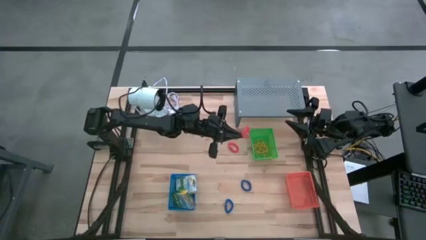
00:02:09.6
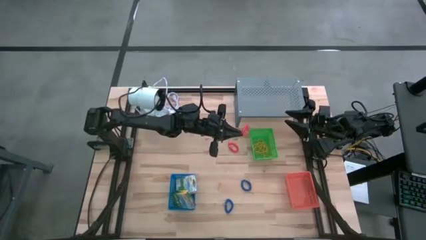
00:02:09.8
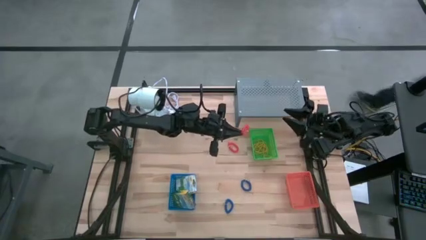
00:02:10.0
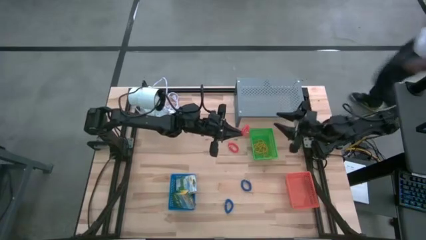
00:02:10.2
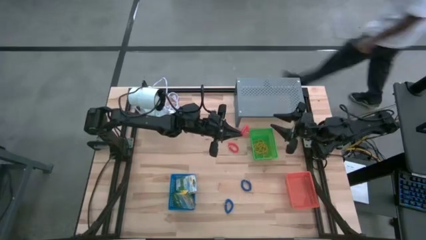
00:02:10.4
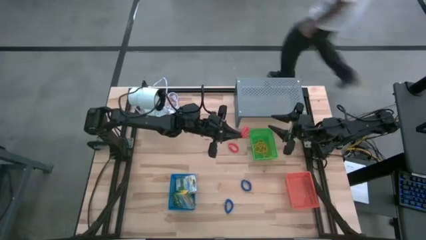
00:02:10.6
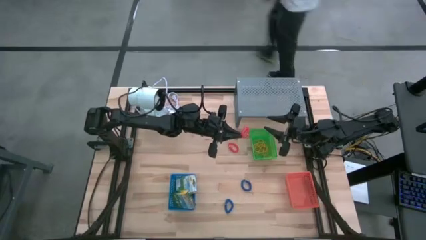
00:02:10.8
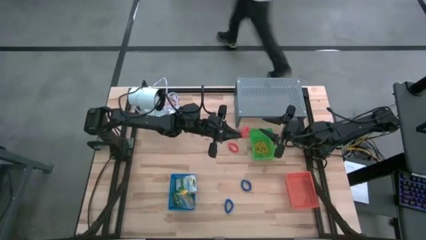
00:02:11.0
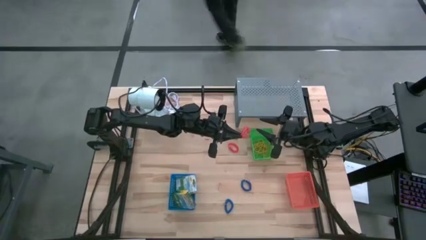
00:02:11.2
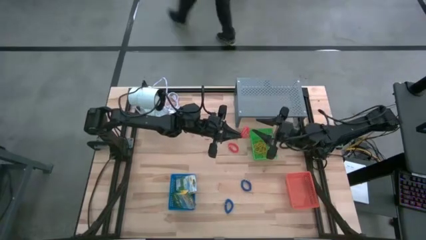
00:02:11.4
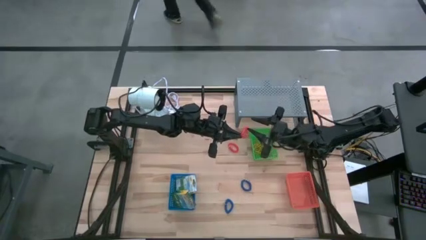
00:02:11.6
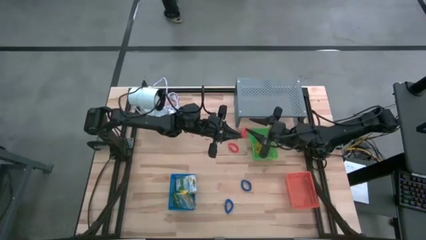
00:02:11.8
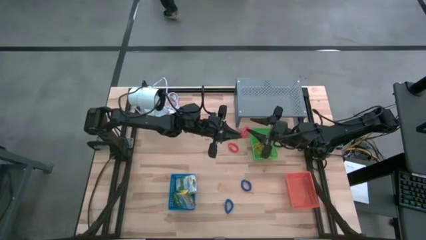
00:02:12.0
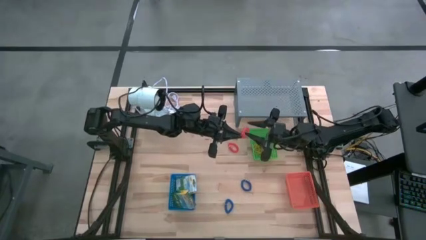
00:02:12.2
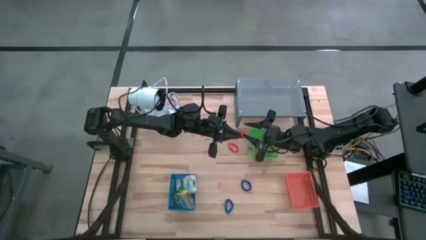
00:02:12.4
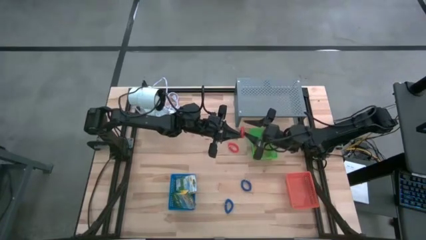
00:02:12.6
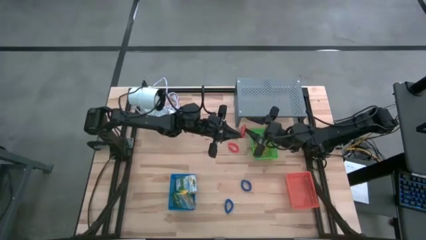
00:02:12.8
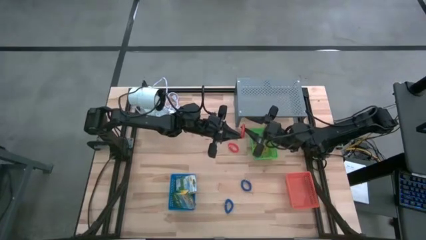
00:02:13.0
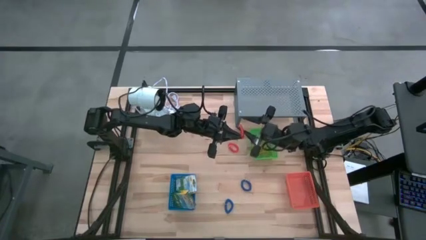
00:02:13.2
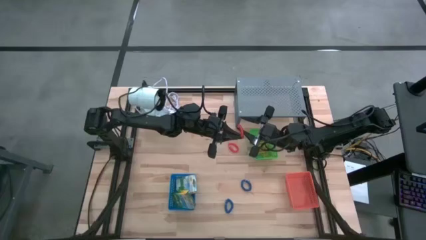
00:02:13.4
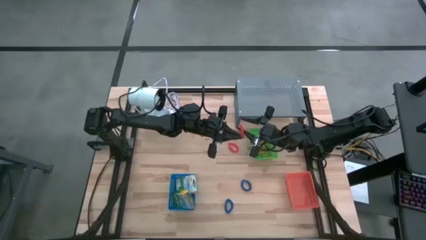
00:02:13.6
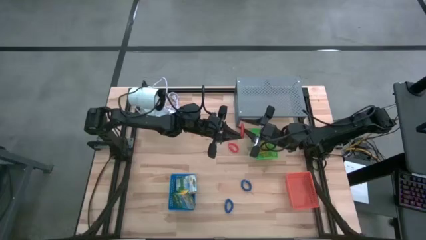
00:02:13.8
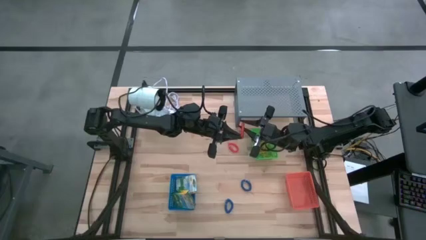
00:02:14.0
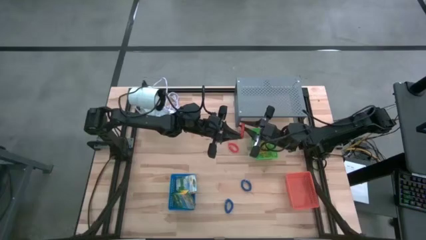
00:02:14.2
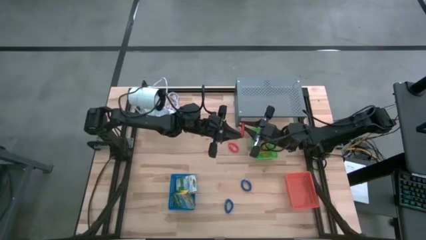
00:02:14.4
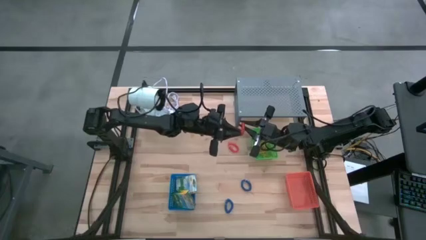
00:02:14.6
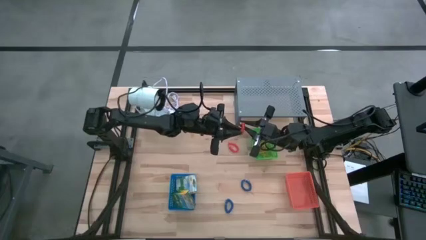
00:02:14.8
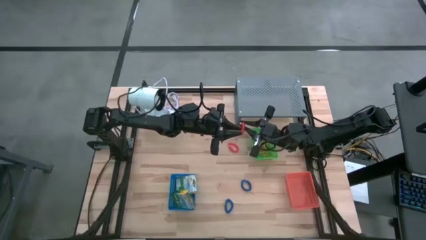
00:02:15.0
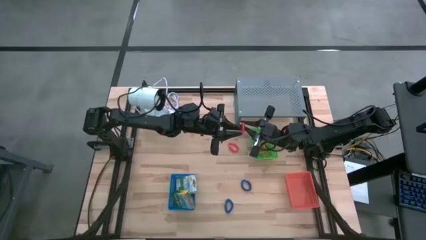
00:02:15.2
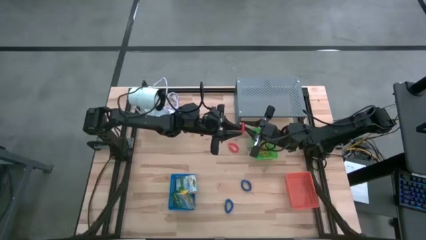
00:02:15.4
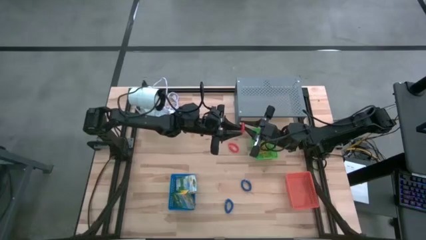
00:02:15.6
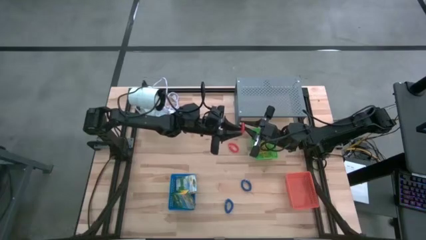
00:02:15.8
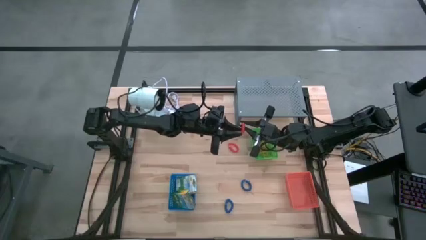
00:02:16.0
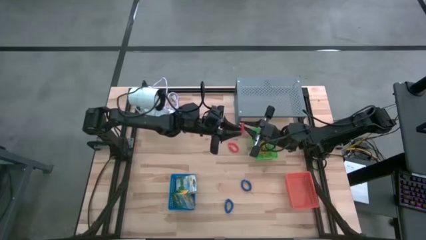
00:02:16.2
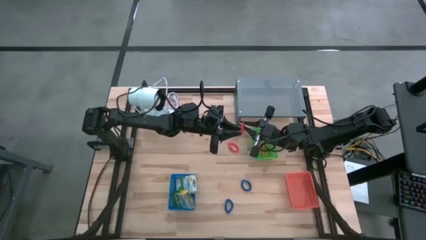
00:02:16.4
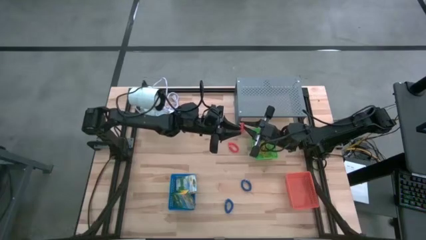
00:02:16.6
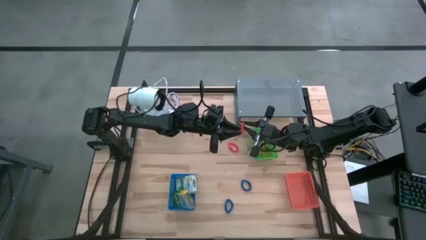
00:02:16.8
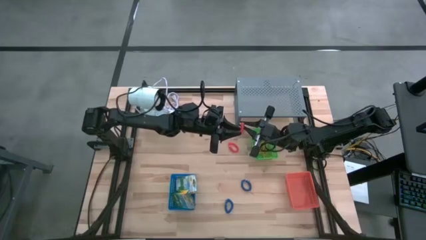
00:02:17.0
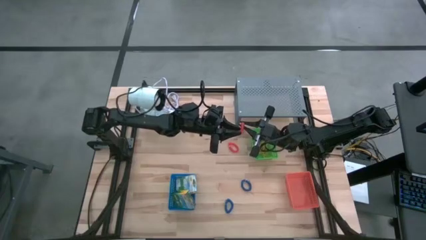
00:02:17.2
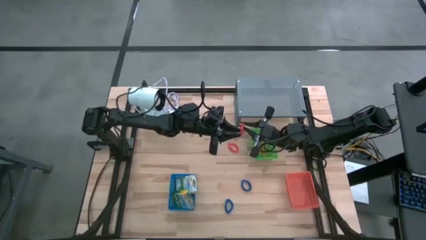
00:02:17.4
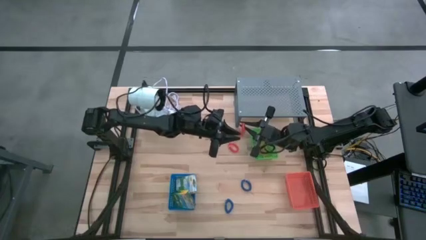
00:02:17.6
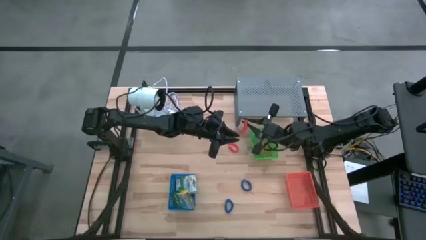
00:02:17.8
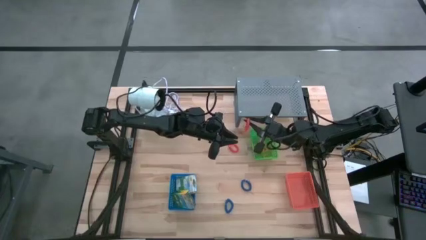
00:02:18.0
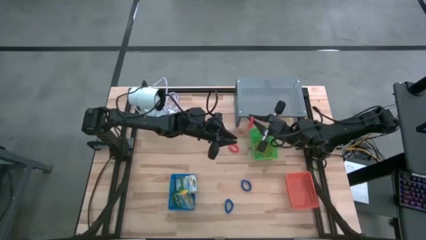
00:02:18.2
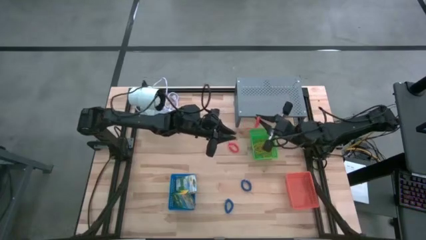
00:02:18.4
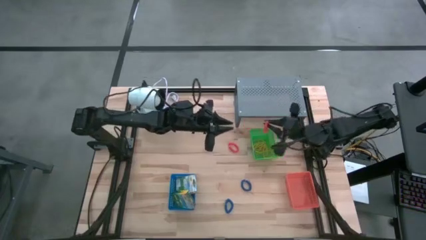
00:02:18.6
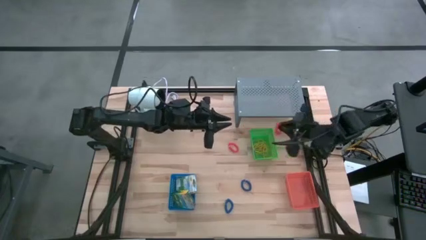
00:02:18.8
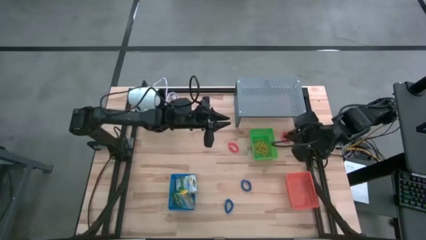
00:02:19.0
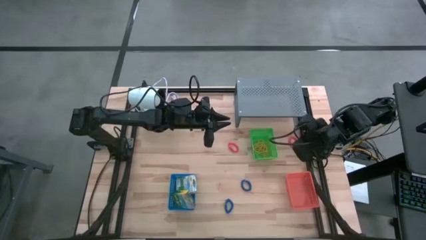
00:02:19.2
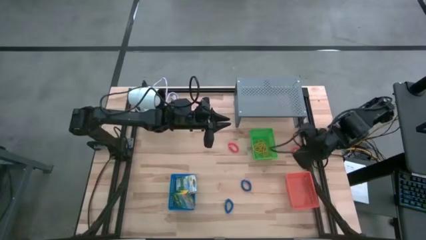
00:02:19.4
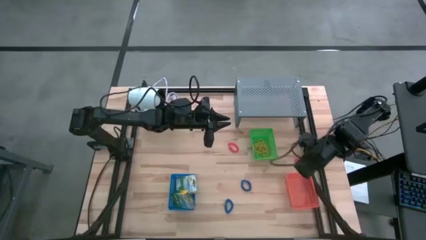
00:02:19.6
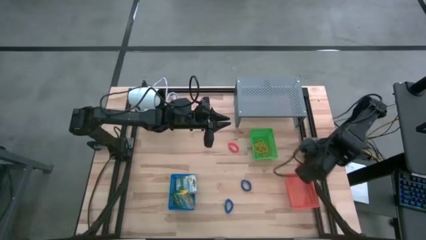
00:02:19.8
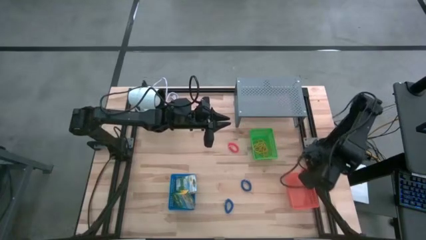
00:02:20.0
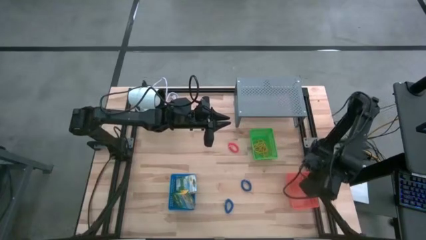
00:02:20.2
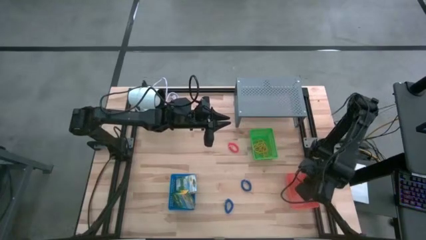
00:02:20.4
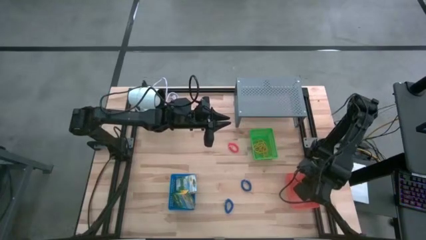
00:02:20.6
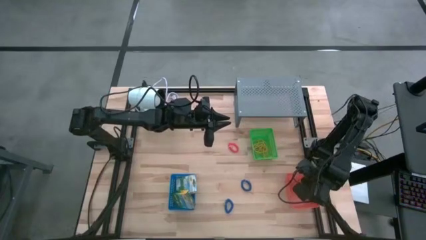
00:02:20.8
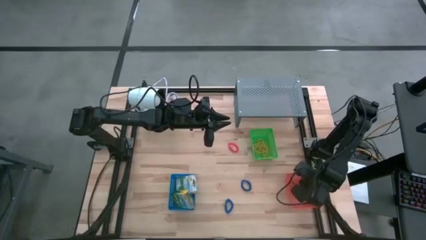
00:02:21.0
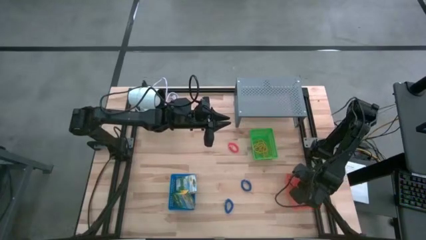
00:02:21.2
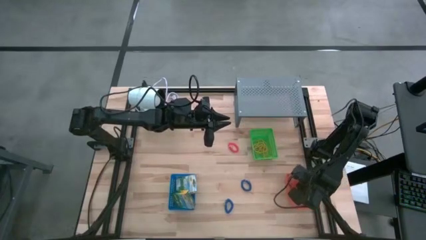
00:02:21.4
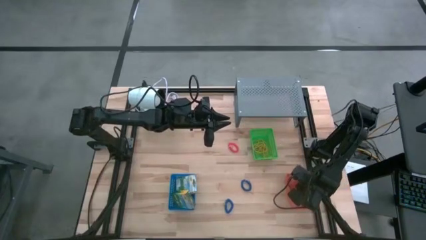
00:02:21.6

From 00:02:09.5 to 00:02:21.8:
Task: Pick & Place Office Desk Supplies
Put the orange spring keychain into the orange bin

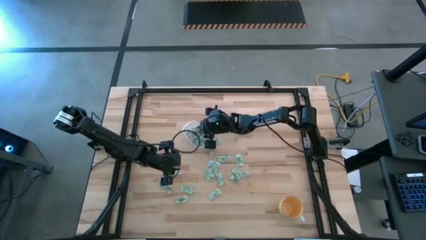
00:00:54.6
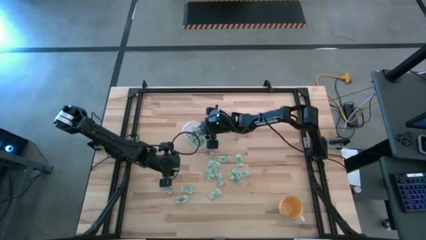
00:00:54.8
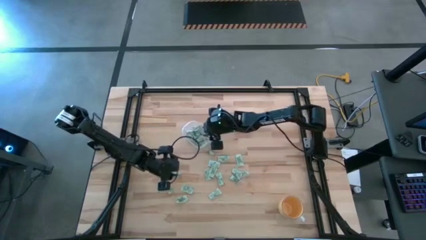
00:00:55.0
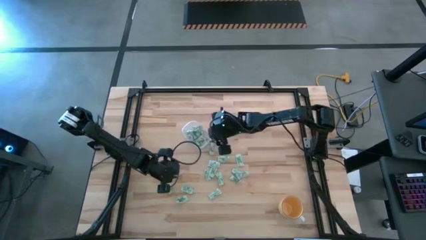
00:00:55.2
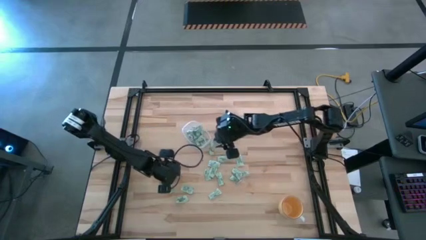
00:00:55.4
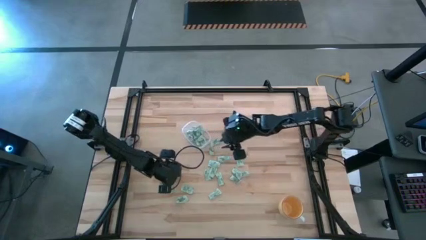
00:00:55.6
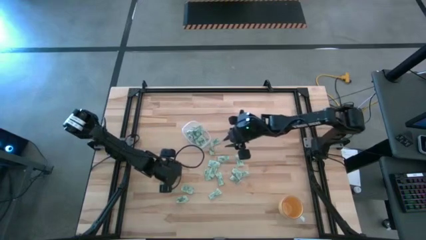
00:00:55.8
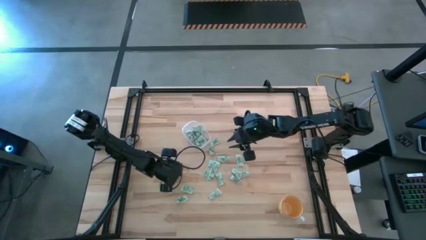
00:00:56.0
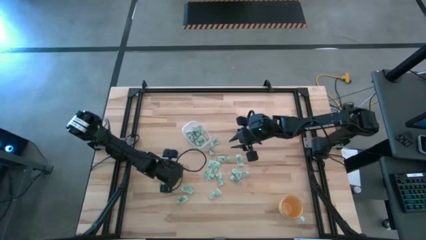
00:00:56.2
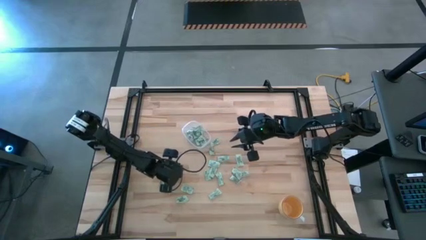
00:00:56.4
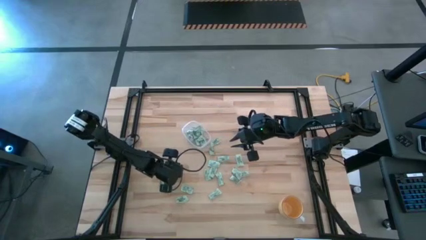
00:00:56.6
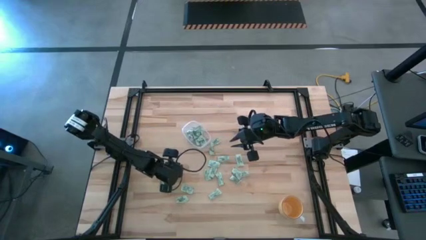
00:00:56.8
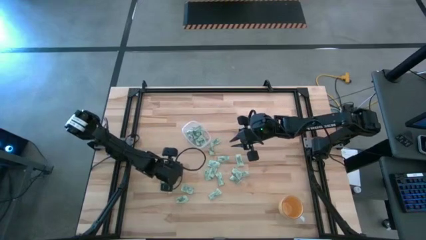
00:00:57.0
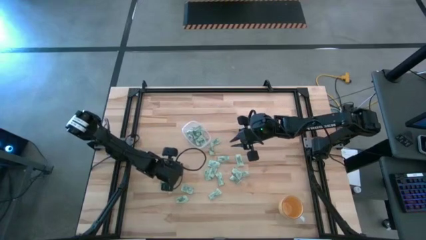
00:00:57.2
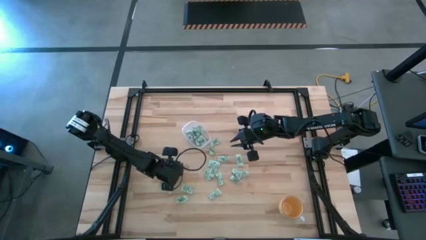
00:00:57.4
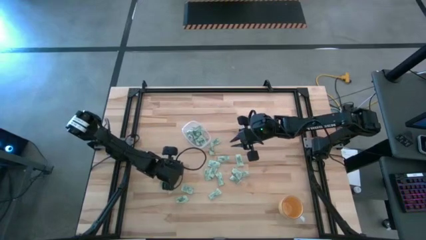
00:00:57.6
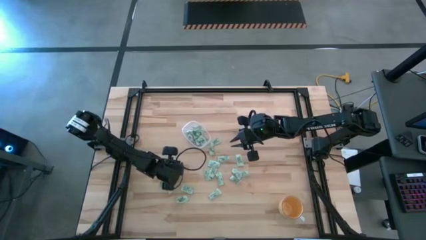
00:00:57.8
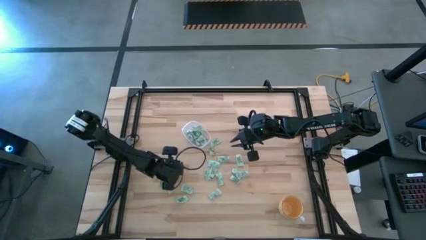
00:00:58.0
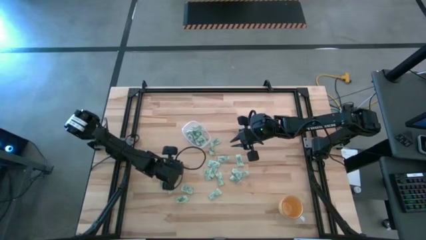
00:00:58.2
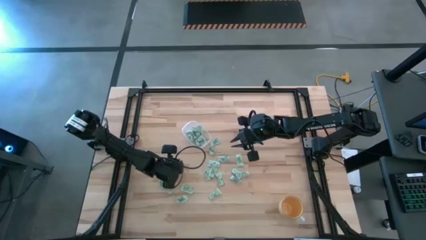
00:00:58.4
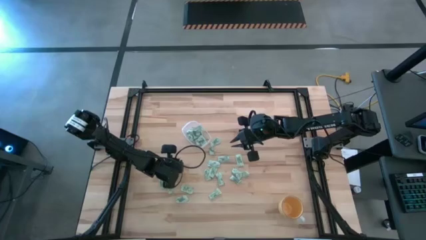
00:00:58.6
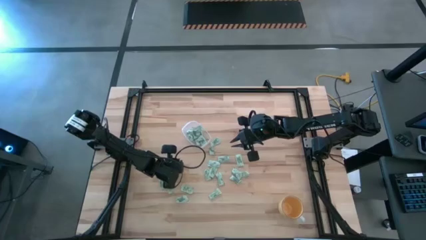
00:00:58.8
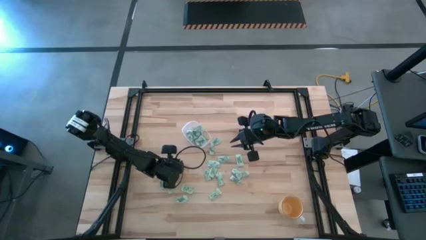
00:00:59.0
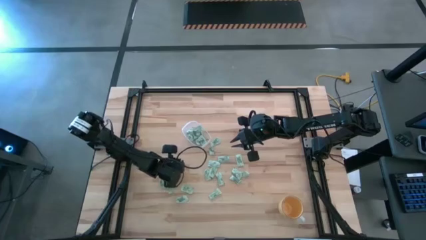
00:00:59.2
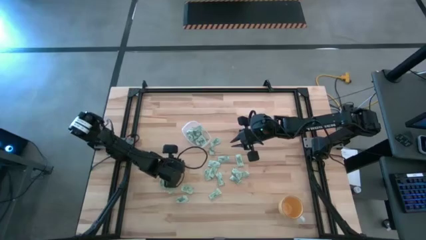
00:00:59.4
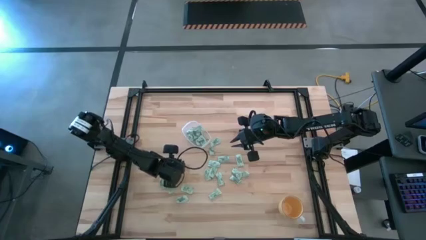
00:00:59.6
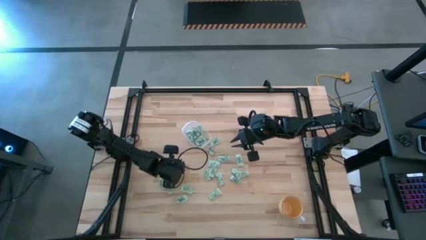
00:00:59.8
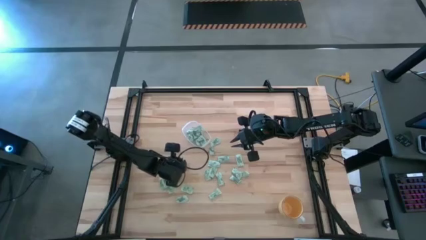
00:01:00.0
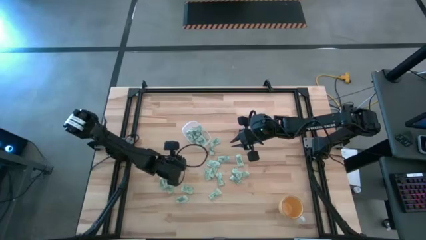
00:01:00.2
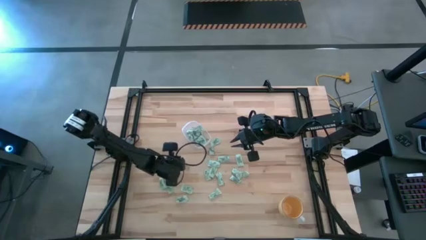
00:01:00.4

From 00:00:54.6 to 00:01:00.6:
Task: Pick and place Stevia / Truvia into bins
Put the stevia packet into the transparent bin
